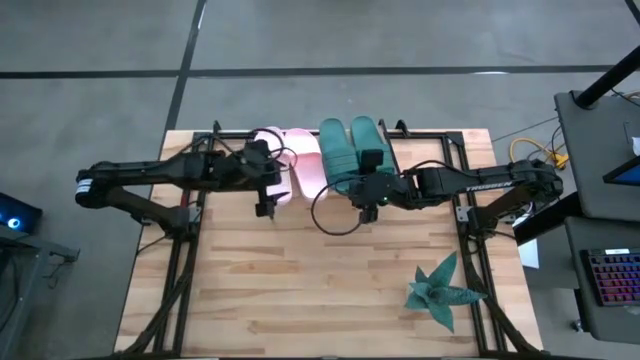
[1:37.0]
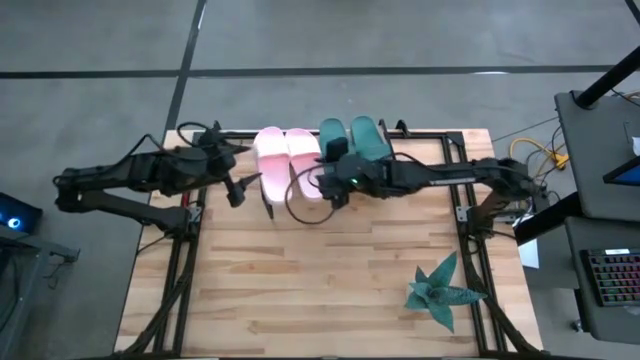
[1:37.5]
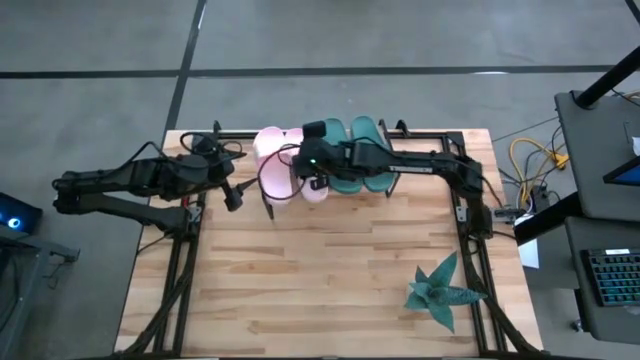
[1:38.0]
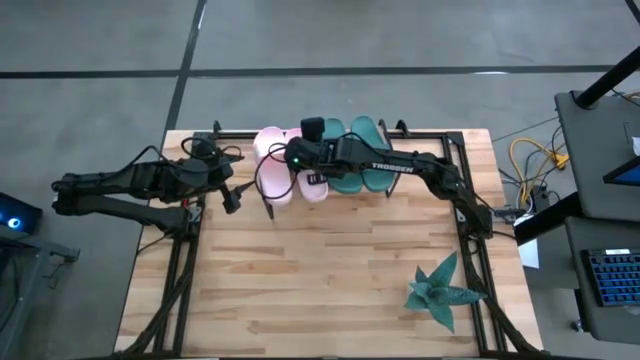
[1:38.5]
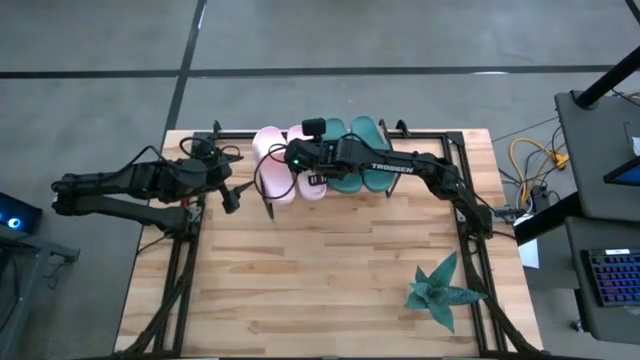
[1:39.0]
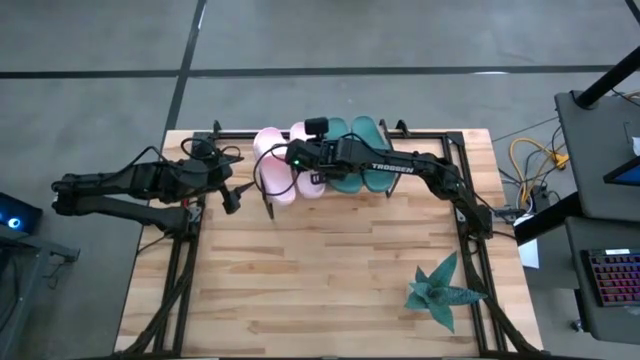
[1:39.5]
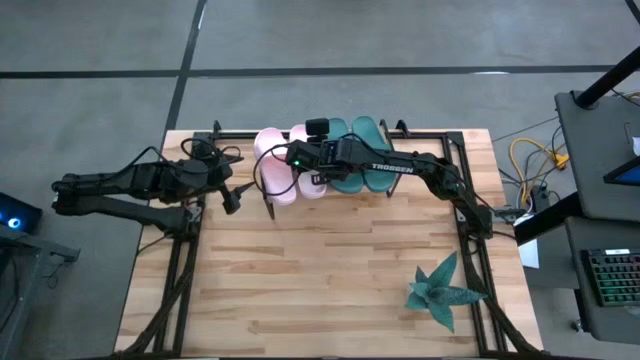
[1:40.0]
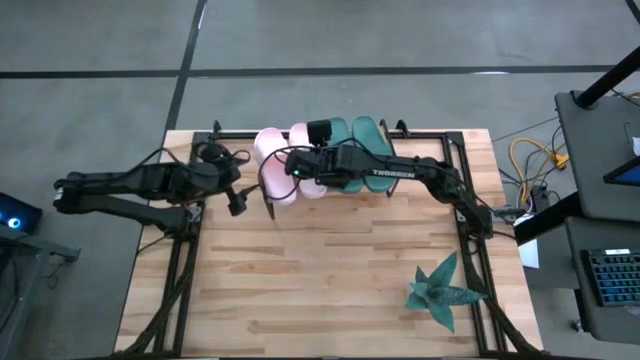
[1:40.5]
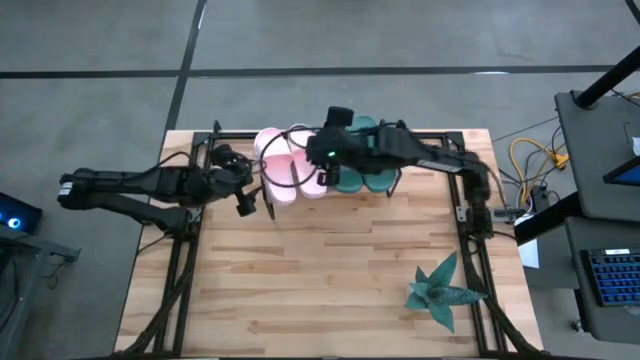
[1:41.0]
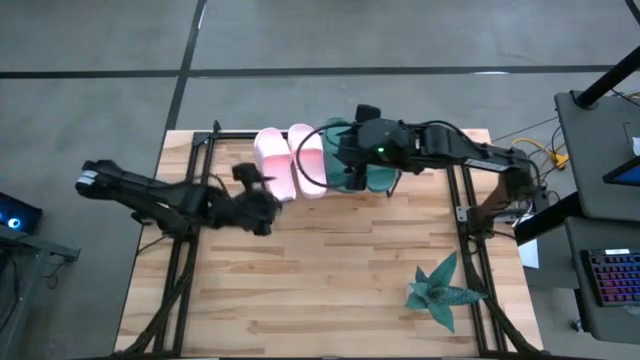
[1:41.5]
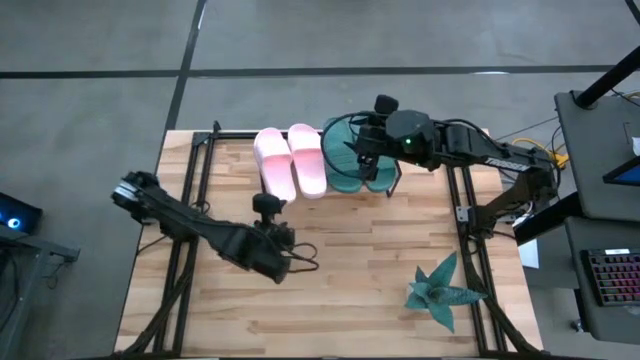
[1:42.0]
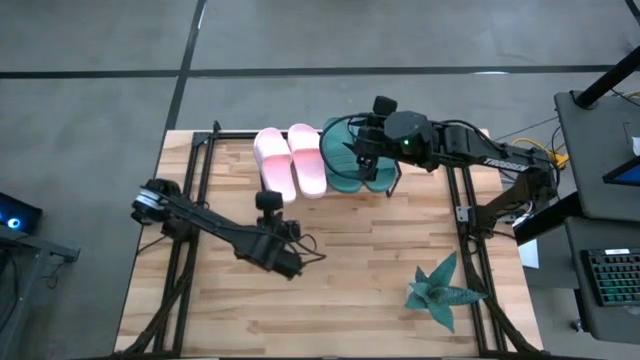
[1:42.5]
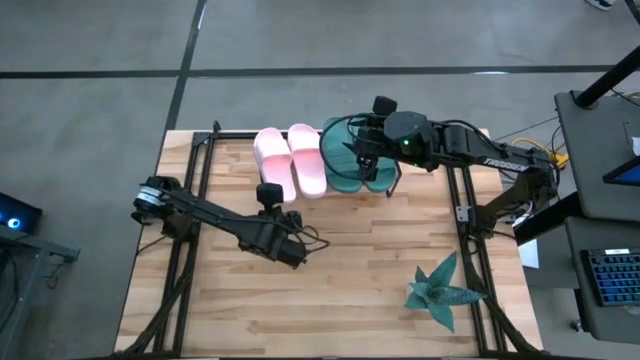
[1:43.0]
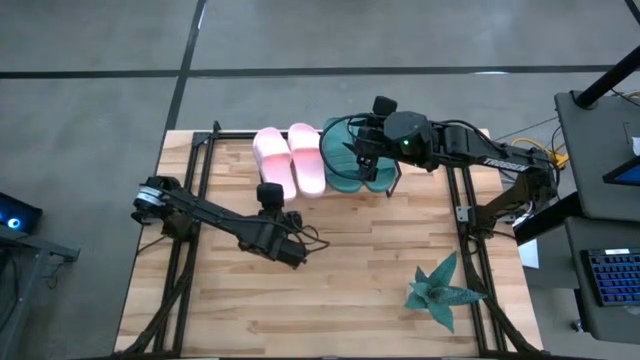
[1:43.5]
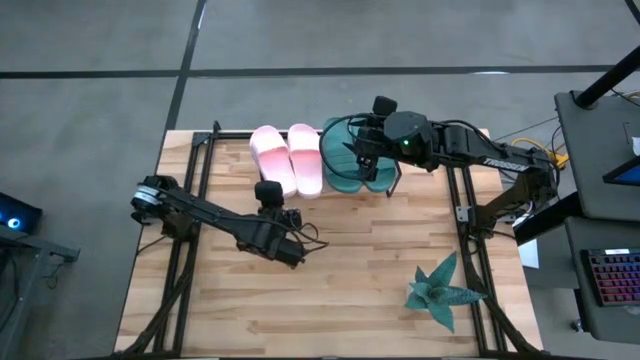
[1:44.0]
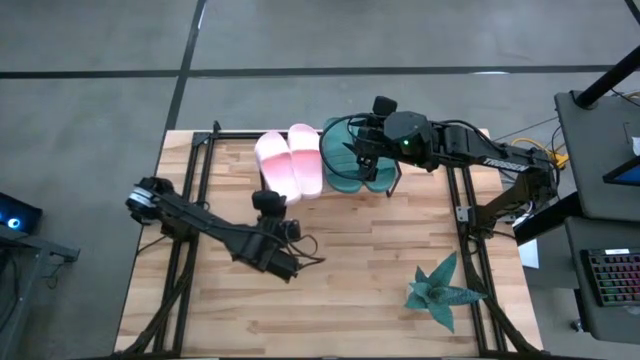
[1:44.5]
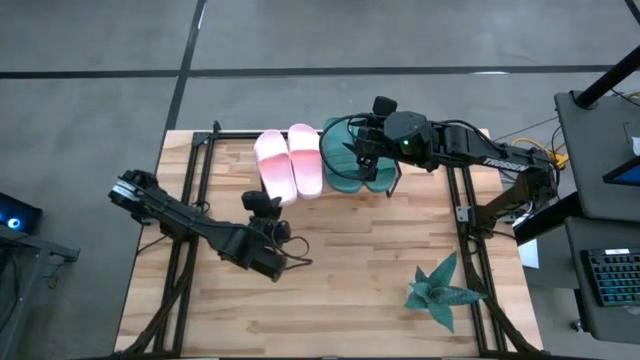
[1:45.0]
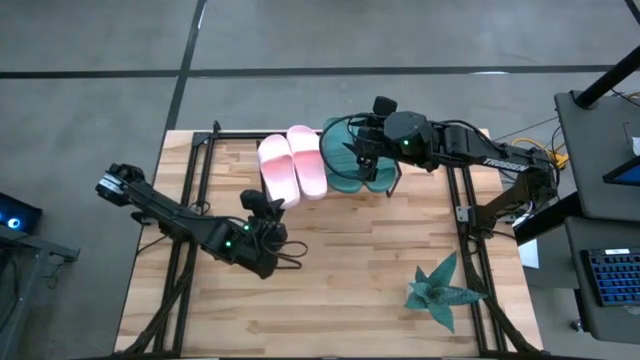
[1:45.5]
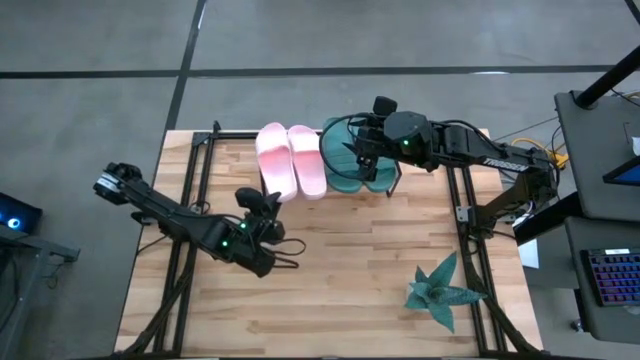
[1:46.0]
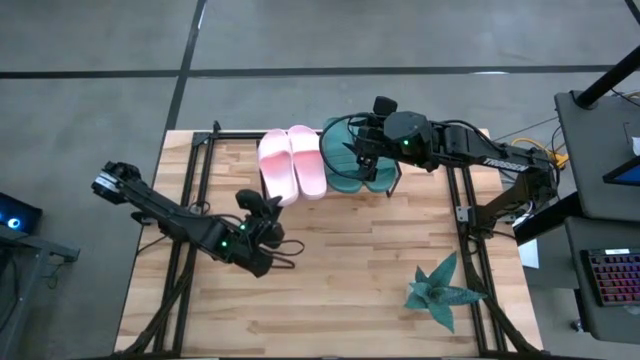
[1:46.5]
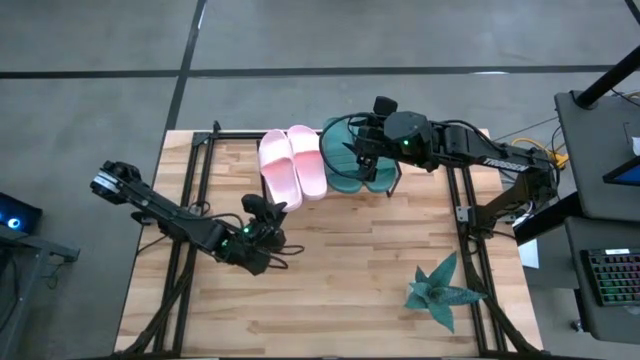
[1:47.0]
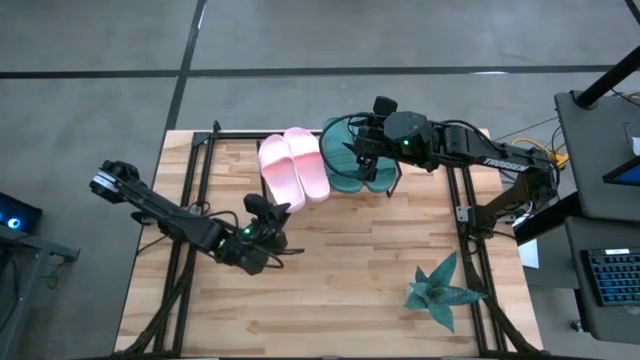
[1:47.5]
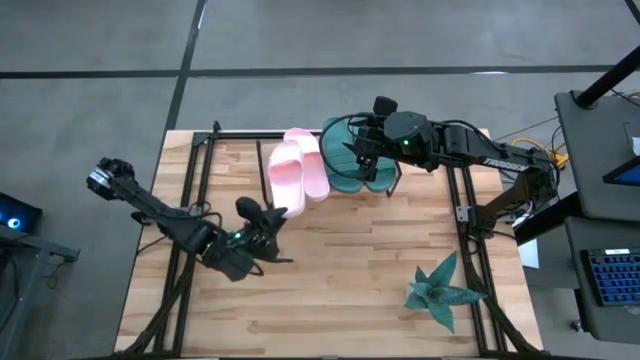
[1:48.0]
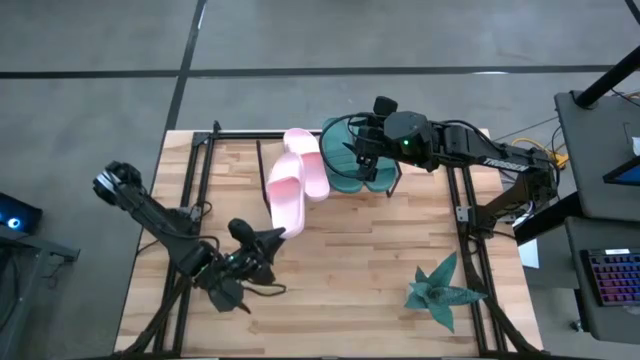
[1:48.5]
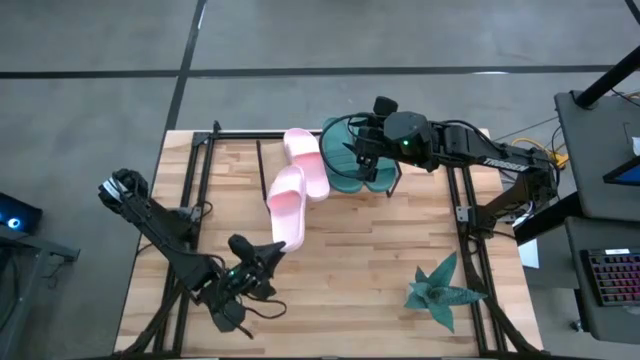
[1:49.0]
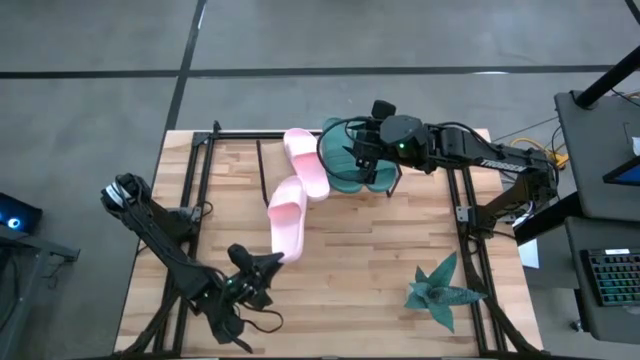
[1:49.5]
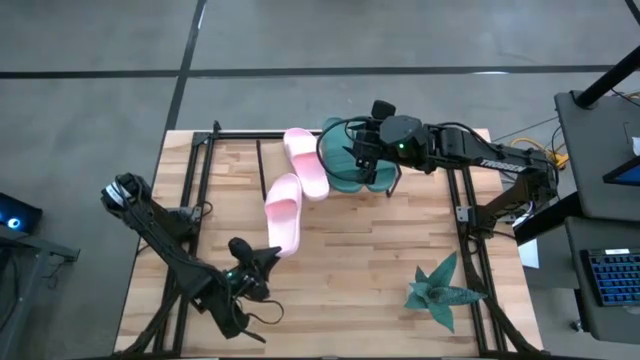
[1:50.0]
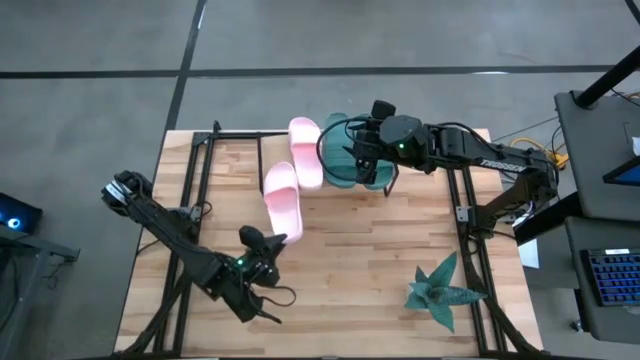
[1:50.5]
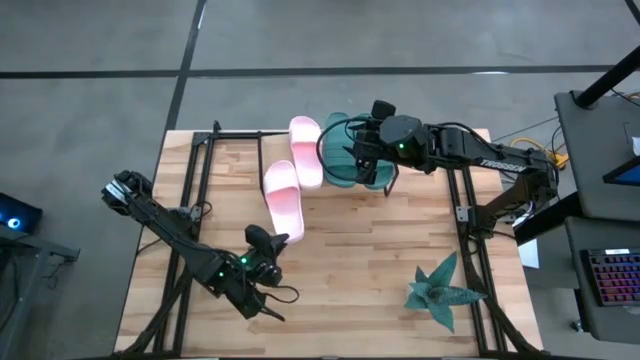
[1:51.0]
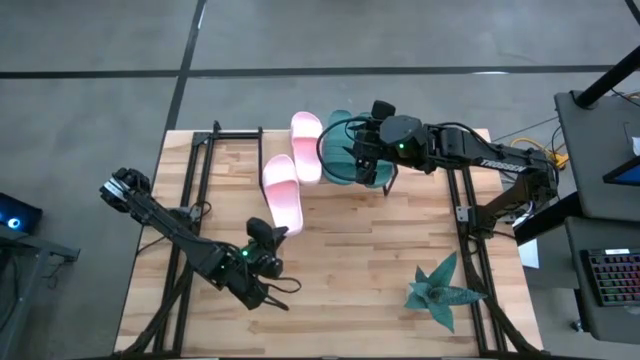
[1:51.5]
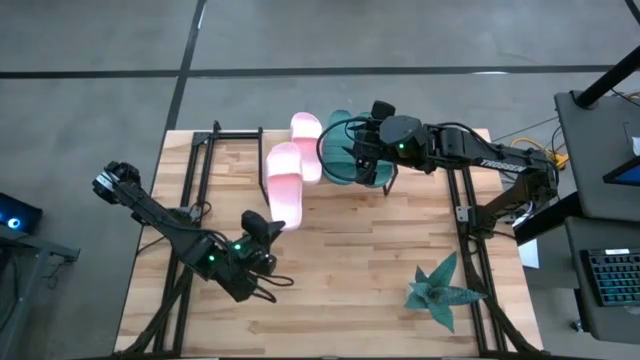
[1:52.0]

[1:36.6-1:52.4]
Task: Pick and place slides into the shelf
Adjust the slippers on the shelf

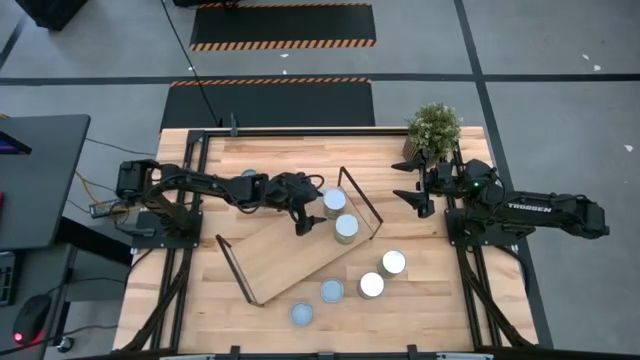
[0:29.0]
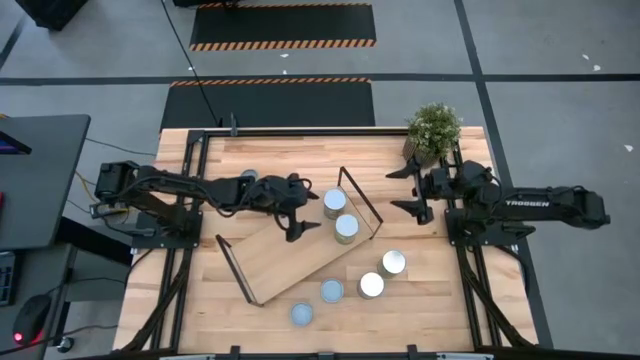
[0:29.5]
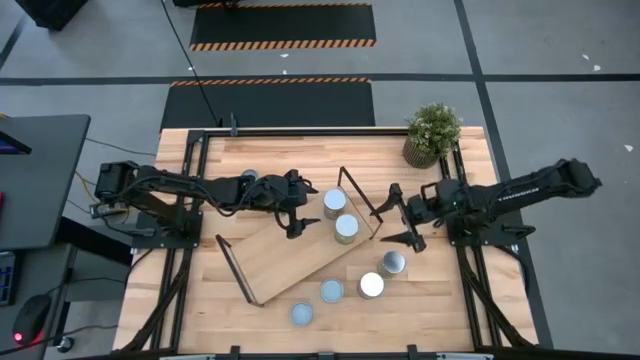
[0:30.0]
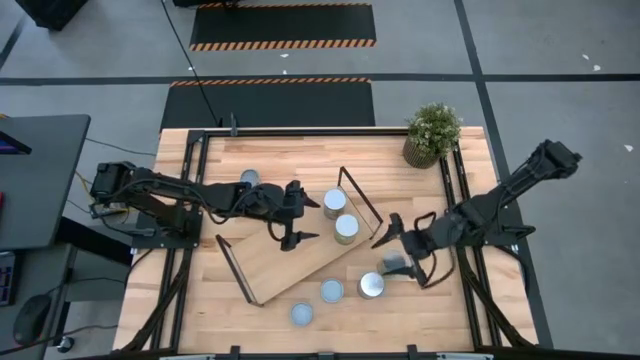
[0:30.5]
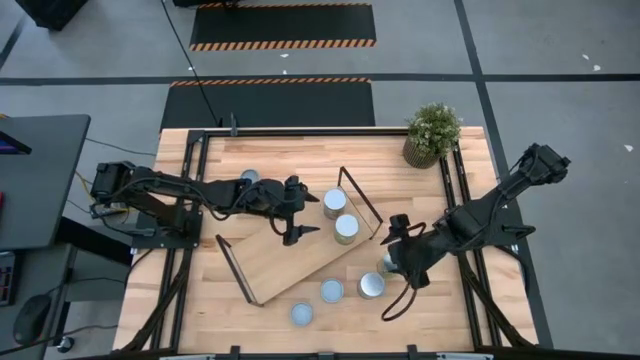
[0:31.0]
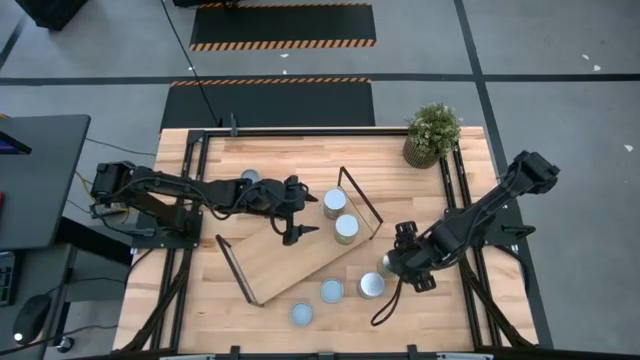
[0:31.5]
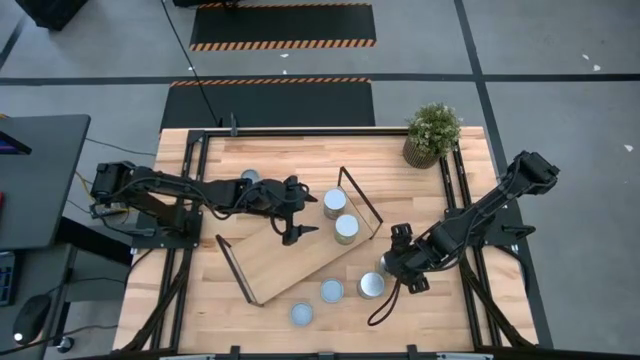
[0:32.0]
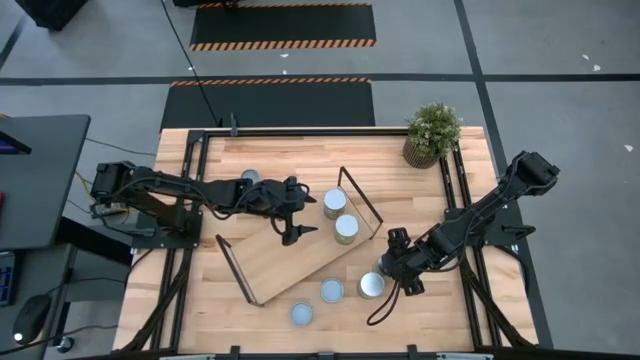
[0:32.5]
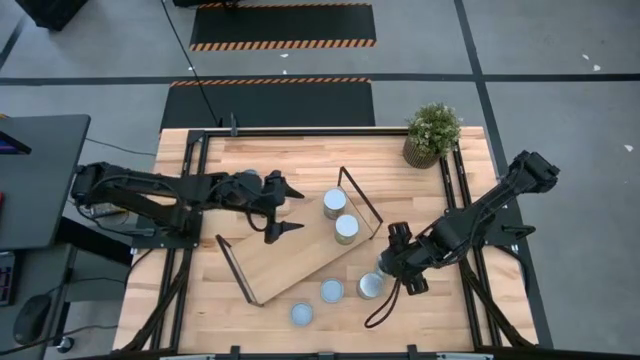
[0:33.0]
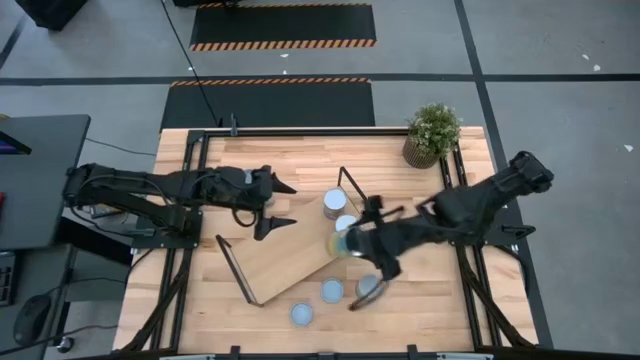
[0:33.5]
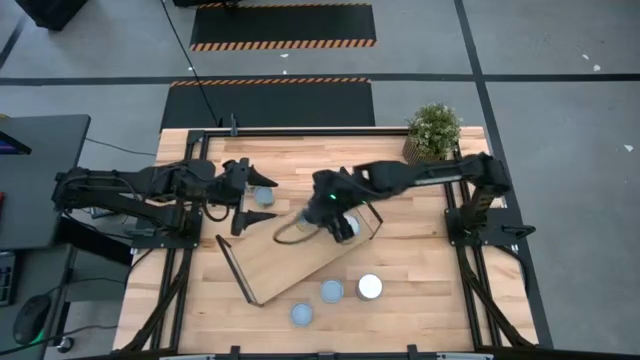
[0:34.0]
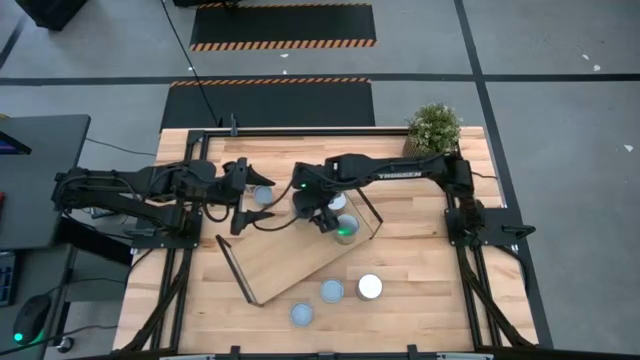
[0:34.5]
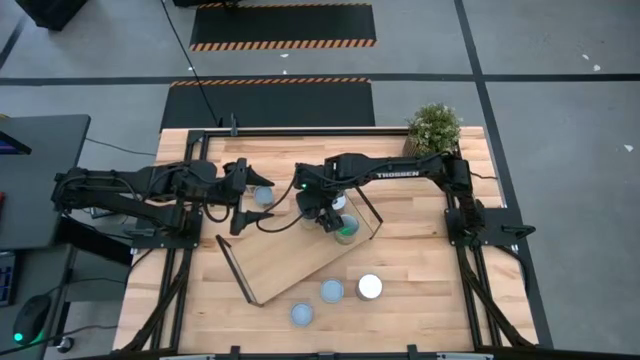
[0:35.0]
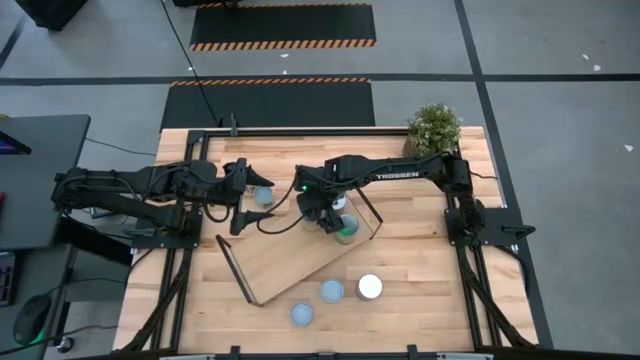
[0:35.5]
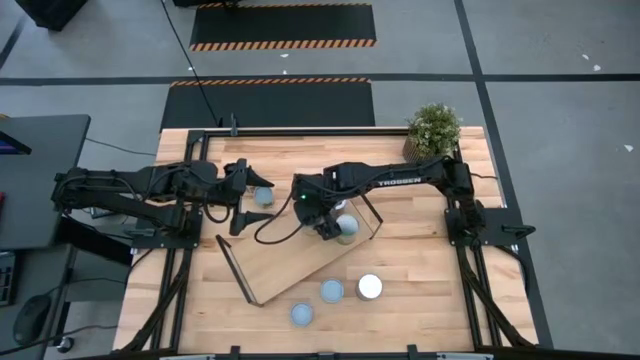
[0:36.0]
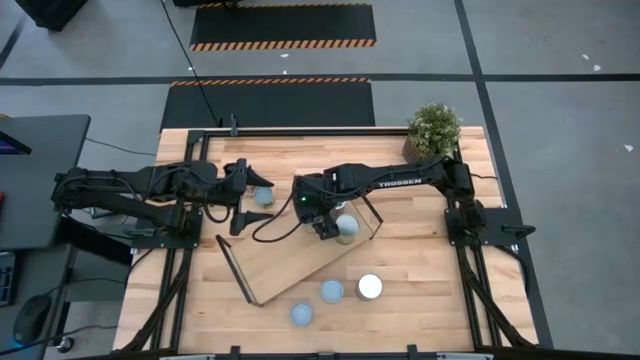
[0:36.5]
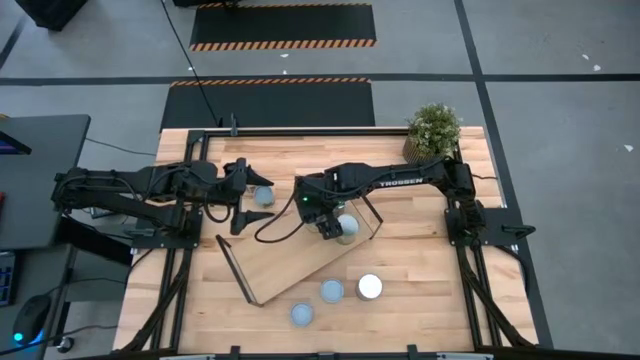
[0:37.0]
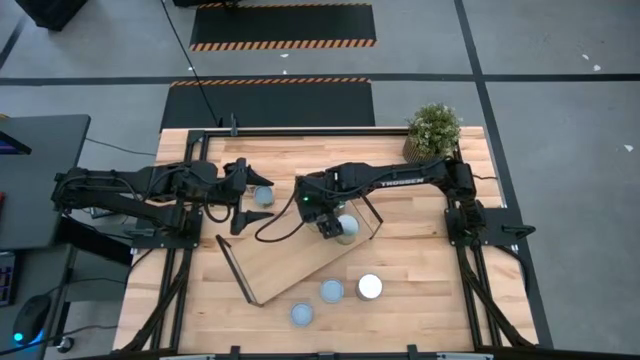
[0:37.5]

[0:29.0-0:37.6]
Task: Pick and place cans onto a shelf
Put the canned carrots on the shelf
